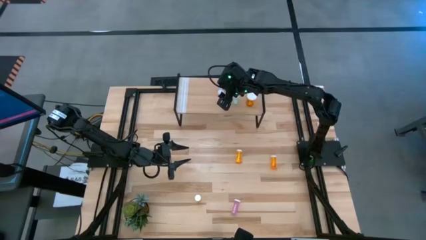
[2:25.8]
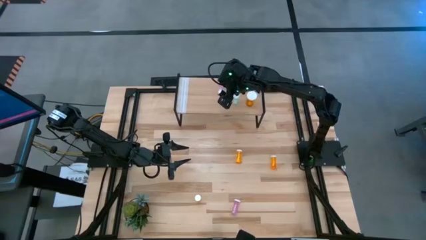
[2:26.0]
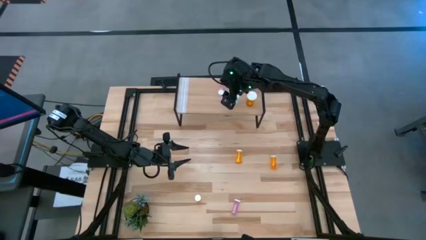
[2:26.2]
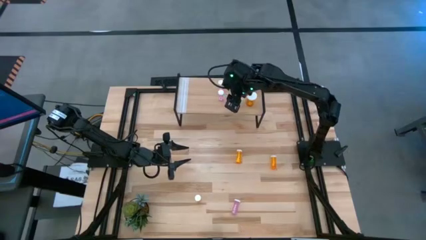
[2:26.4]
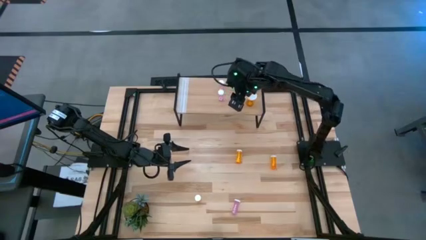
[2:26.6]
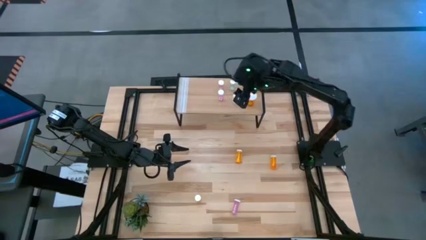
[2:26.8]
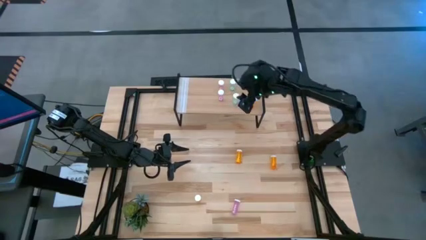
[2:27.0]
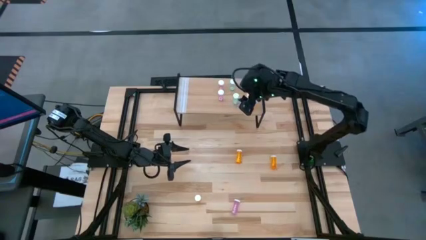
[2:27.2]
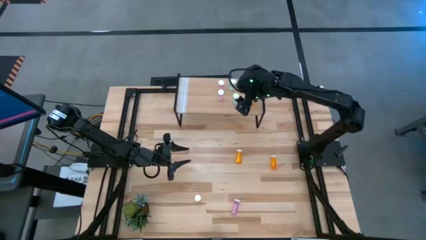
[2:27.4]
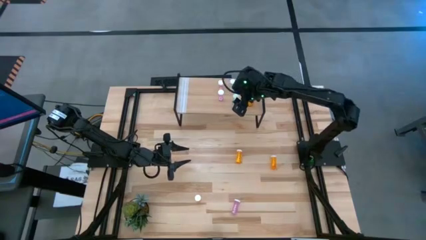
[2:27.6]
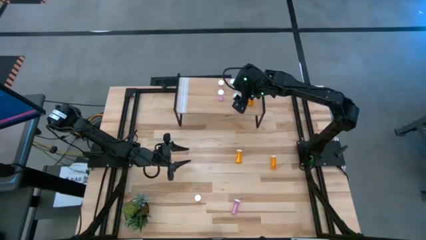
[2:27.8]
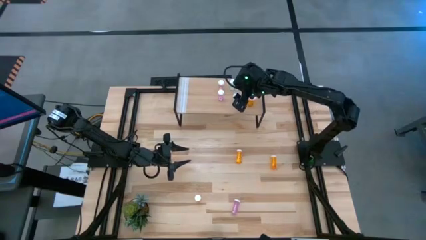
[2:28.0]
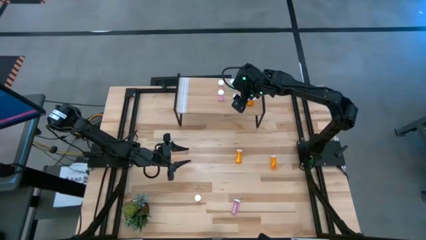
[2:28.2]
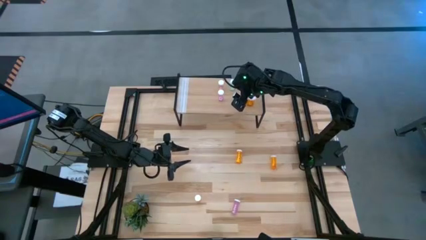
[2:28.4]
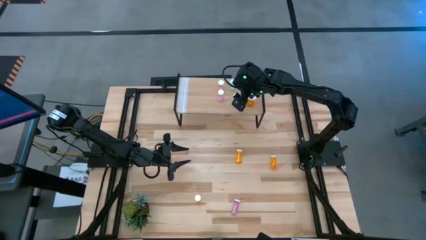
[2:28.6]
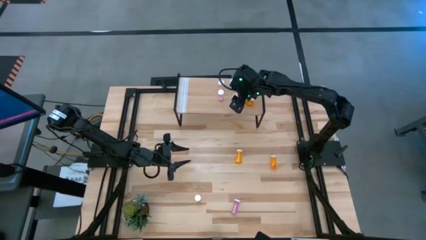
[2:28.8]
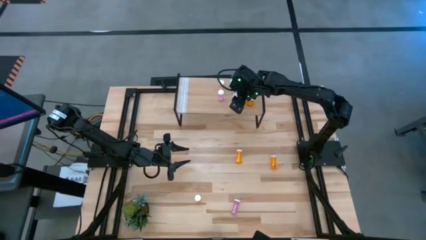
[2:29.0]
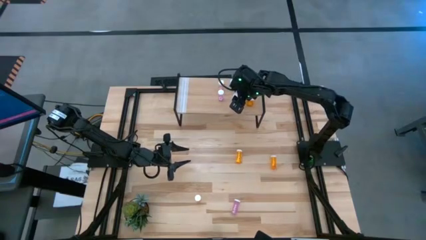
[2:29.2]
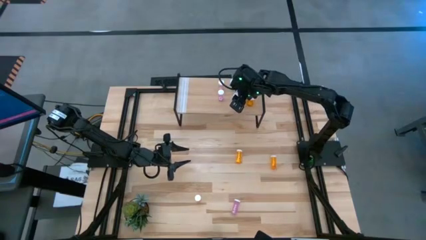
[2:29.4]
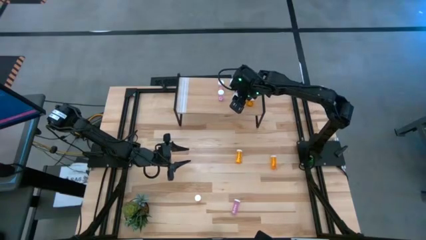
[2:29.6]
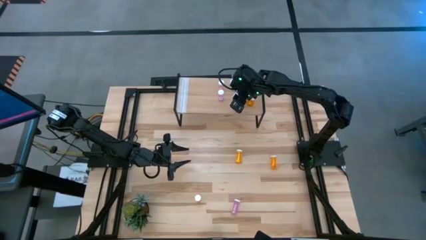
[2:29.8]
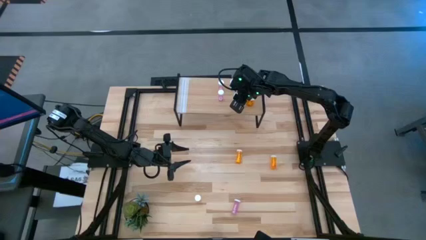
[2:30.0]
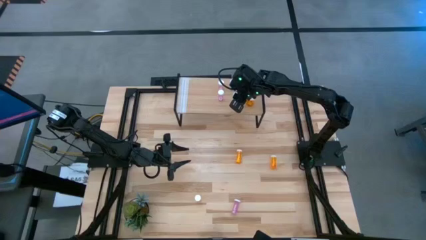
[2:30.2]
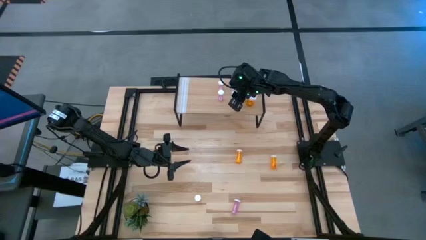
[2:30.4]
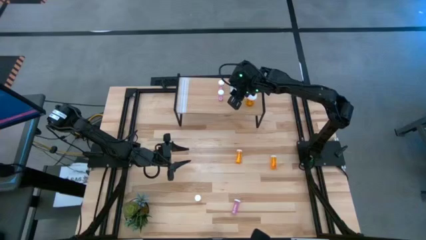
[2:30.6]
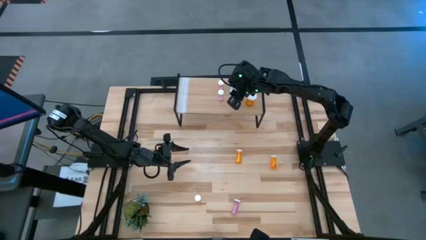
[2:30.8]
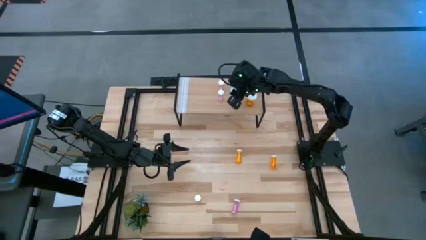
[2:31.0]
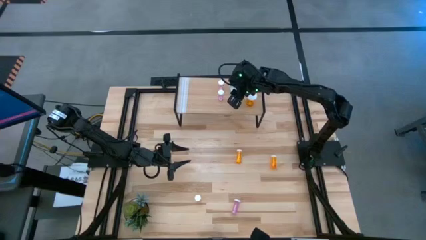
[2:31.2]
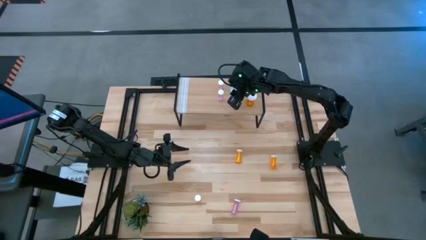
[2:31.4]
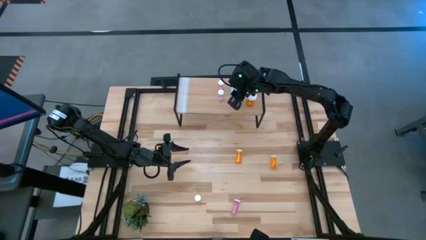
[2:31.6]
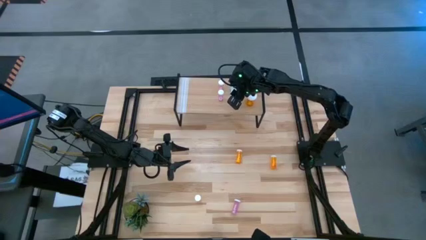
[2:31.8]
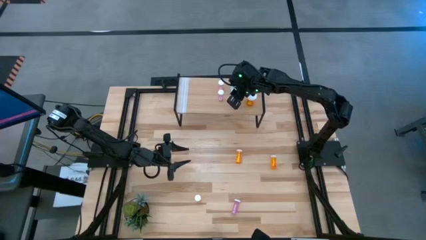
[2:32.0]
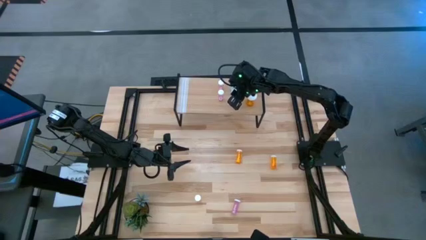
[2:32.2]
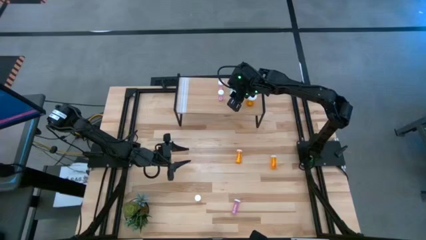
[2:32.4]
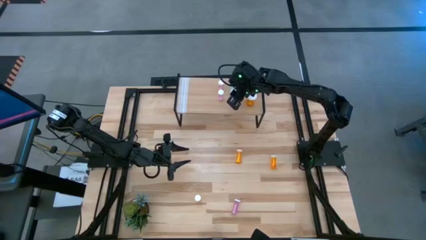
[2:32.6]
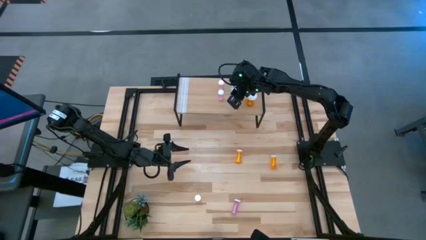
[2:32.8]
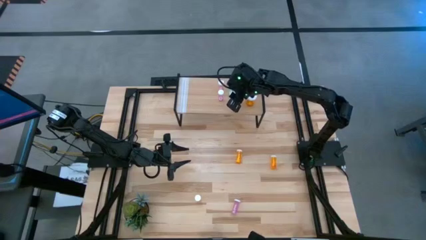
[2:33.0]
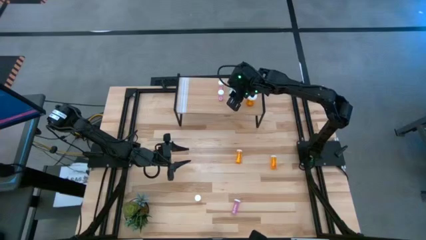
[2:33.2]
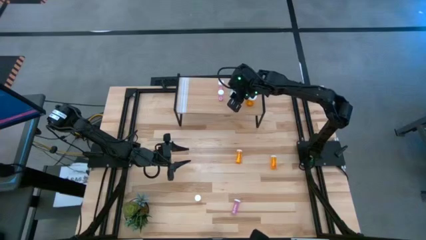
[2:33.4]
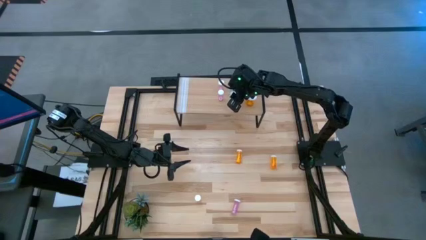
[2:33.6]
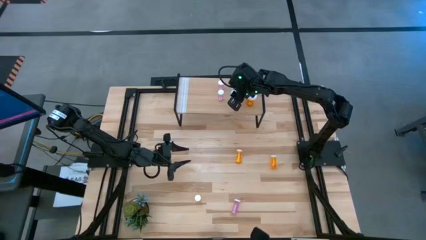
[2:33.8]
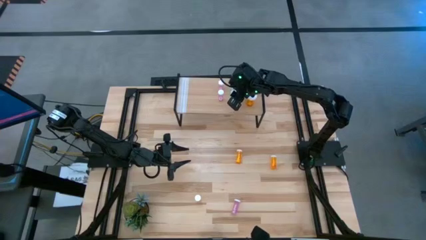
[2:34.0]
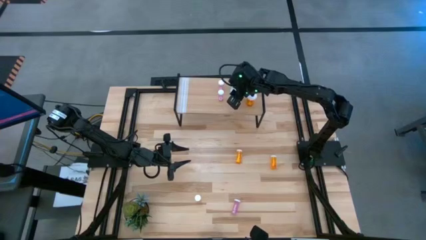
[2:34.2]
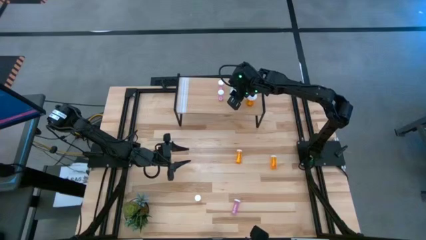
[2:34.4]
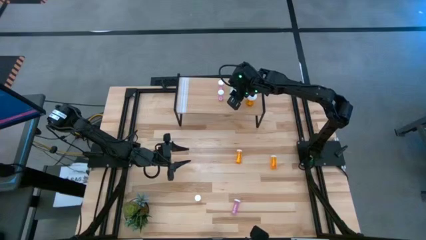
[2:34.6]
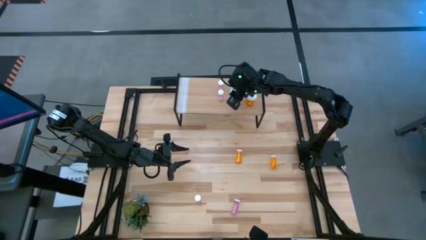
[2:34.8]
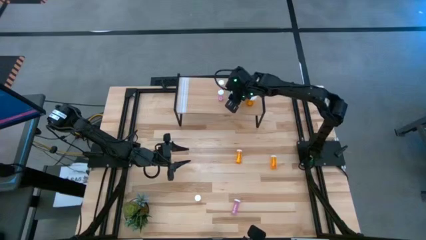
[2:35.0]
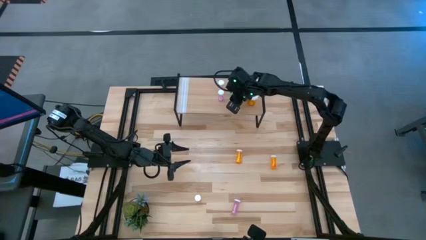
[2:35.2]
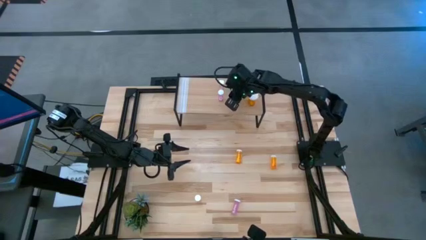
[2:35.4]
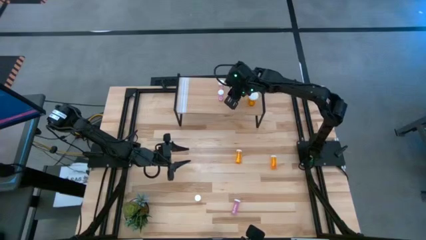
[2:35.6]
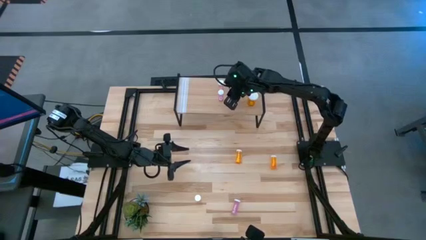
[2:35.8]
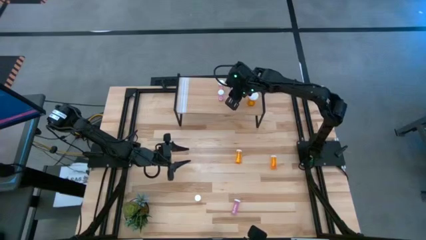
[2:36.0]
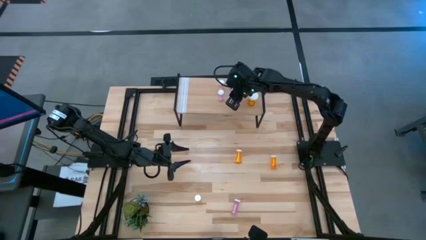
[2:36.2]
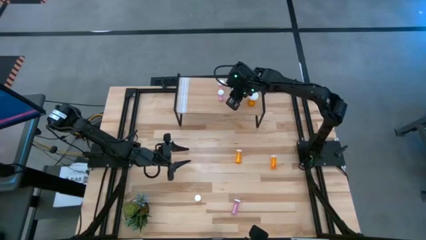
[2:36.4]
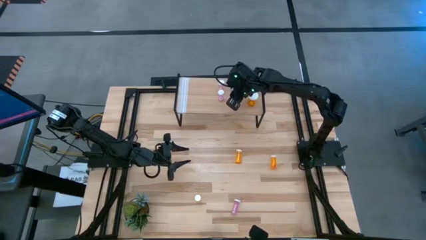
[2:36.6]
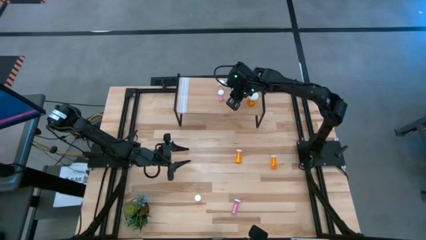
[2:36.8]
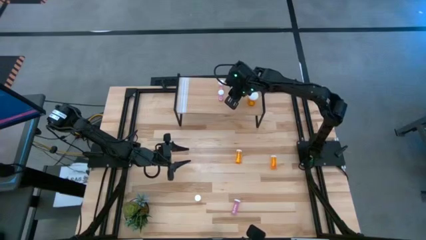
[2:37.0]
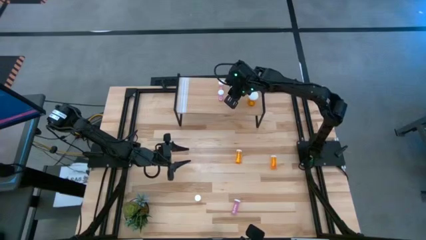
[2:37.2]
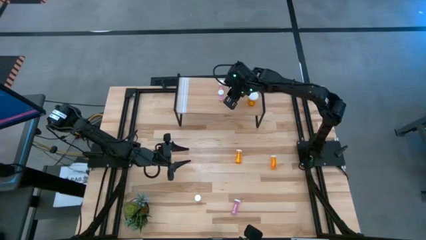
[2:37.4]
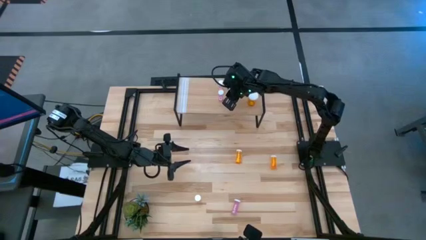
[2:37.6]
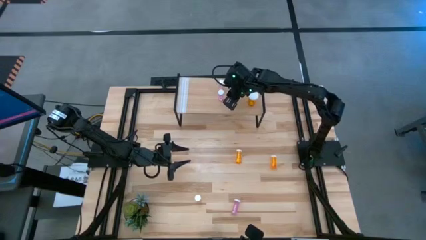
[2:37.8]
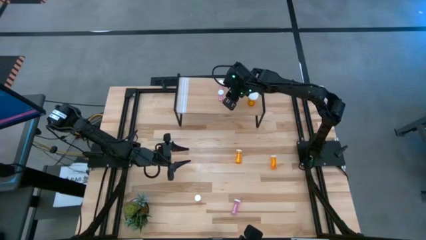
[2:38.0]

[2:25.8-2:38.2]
Task: Pick and place medicine bottles onto shelf by color
Adjust the small green pill bottle on the shelf
